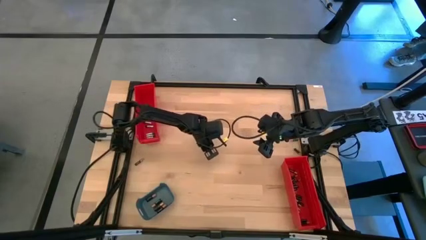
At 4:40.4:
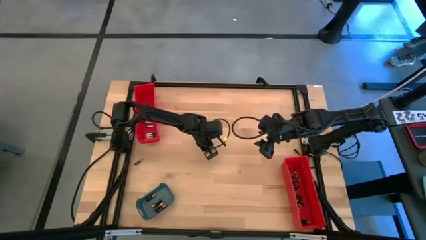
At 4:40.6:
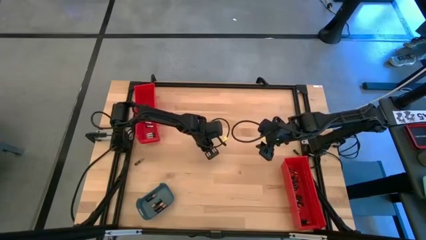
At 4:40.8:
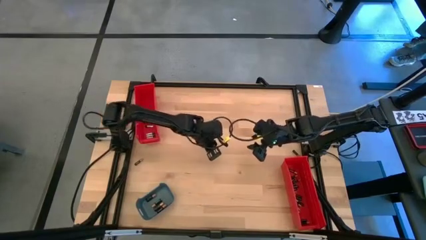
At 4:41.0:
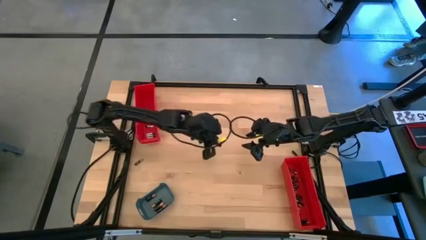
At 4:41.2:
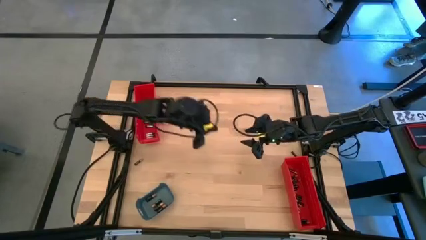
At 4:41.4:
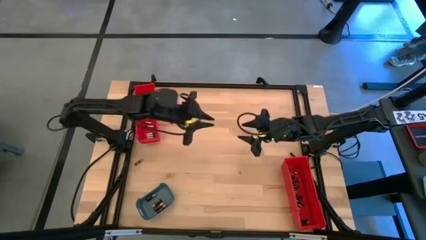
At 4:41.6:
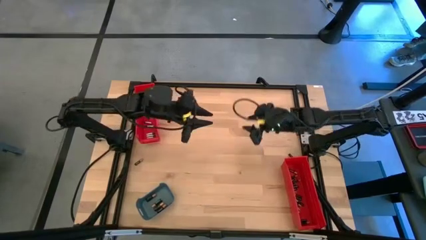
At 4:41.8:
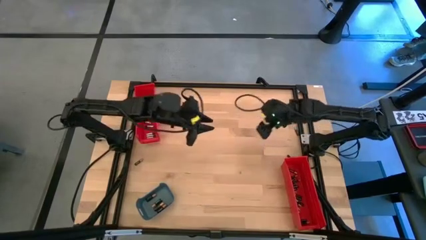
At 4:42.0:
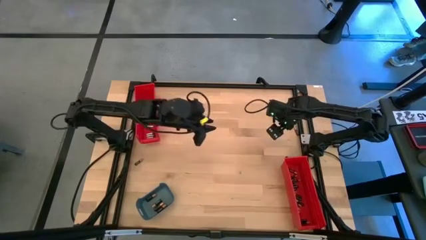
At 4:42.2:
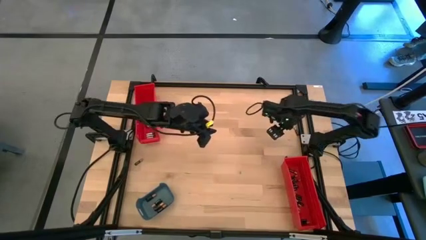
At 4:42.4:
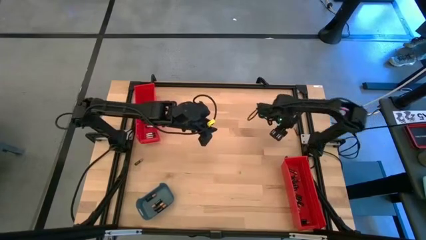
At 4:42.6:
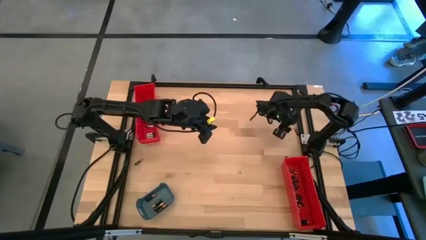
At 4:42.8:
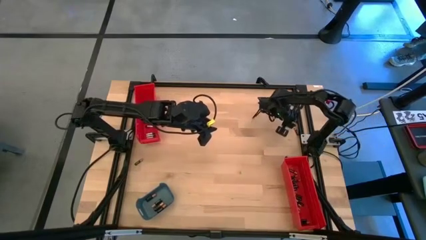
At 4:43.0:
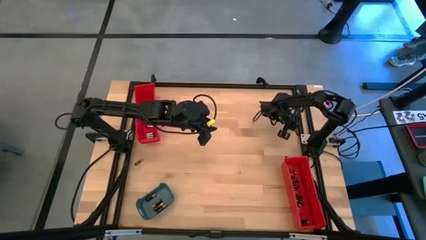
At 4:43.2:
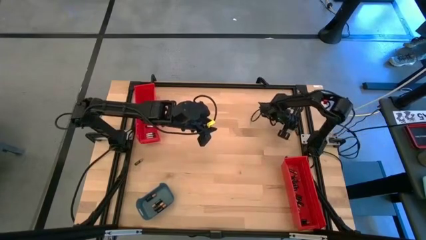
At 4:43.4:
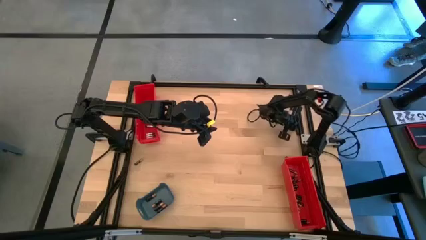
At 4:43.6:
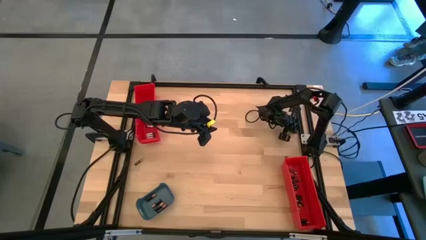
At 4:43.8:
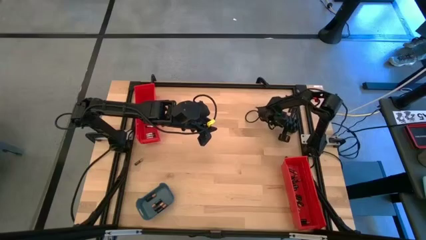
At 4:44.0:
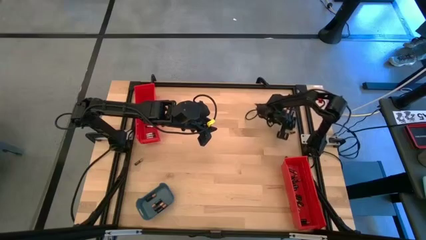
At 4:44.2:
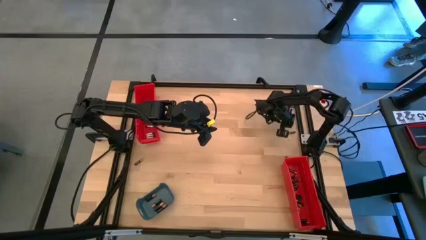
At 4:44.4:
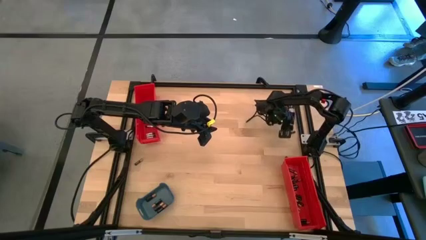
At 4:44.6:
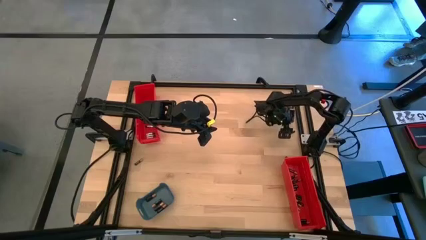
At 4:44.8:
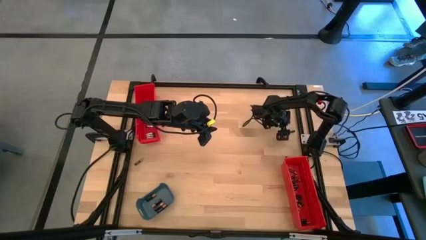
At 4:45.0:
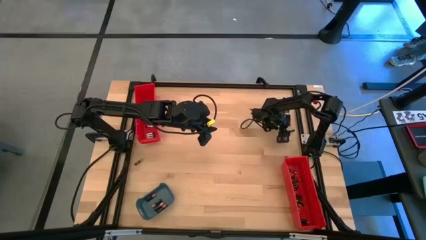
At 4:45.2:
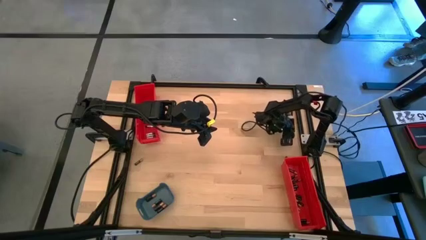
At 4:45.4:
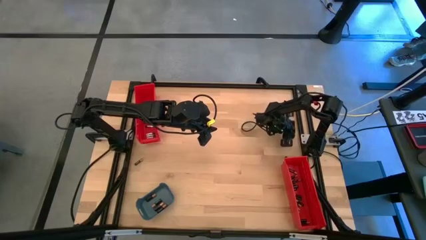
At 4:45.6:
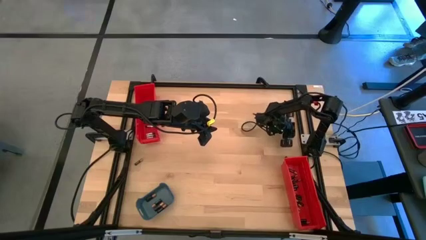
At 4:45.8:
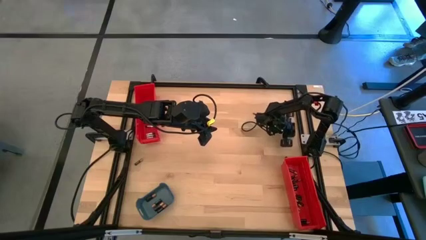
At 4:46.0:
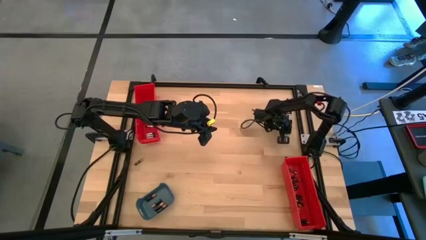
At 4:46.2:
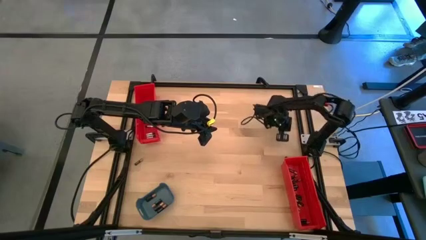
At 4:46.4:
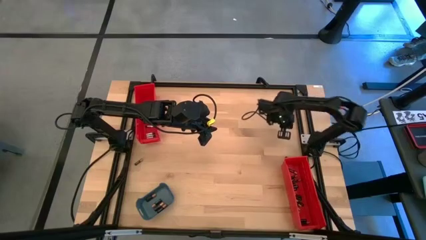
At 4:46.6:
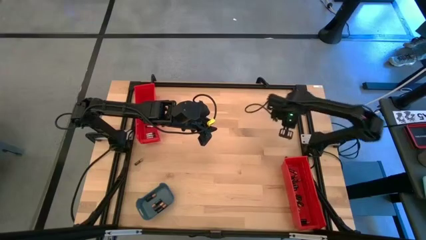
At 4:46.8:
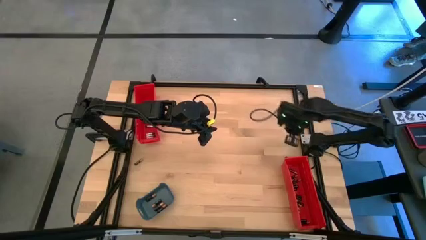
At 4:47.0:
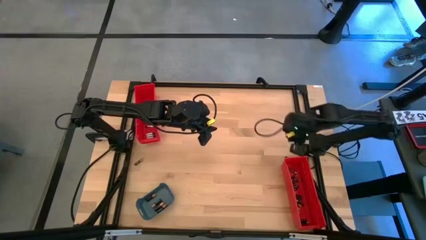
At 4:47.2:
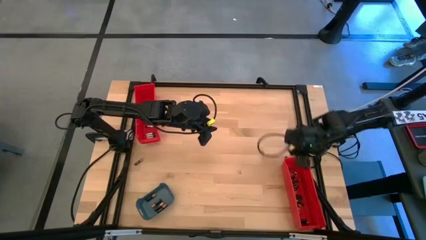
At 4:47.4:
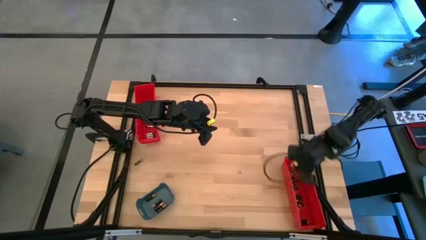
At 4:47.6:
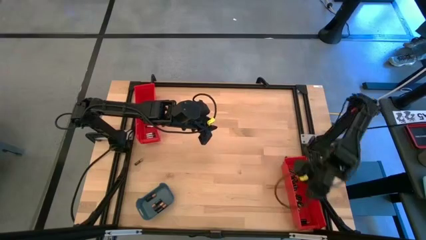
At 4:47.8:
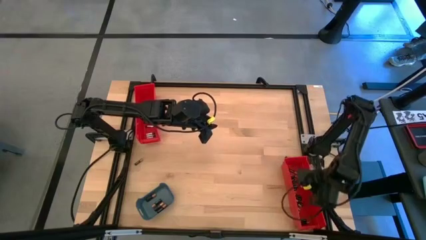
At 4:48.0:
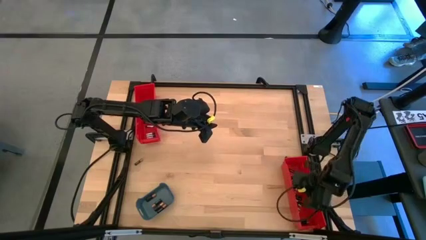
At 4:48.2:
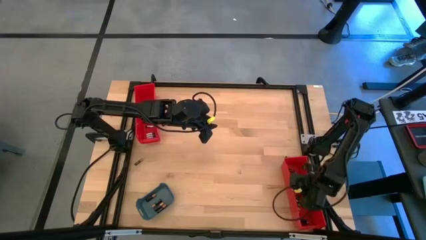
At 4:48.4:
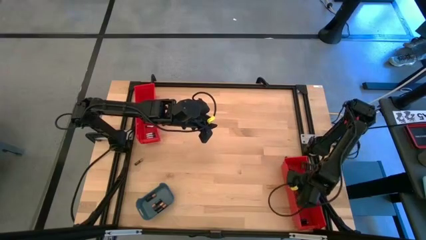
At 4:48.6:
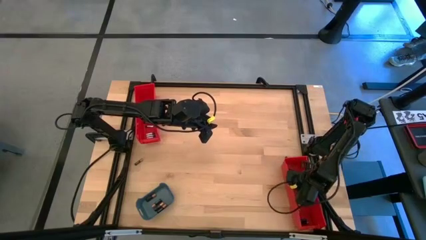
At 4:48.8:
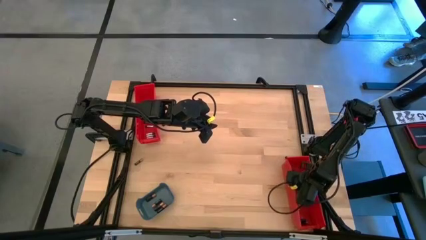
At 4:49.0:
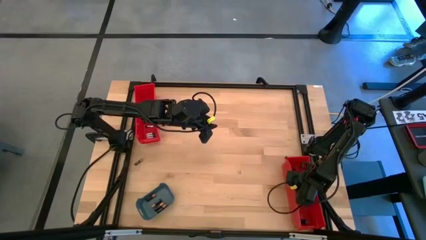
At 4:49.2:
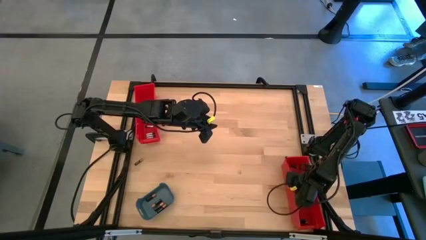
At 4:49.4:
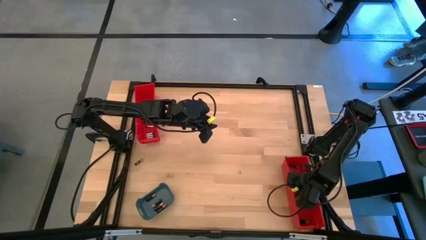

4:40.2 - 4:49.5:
Task: Sort batteries
Put the small black battery into the bottom red bin

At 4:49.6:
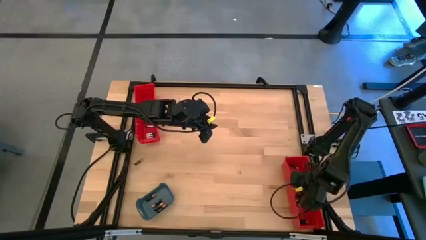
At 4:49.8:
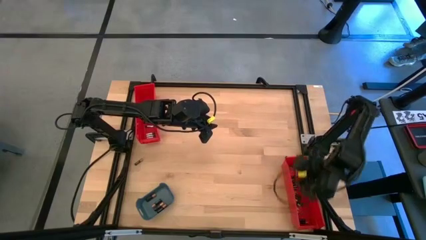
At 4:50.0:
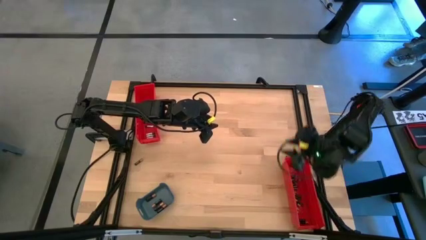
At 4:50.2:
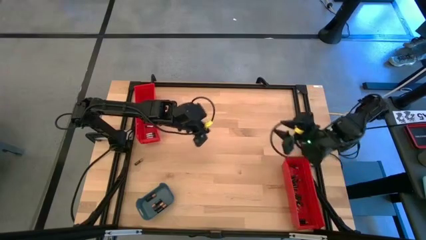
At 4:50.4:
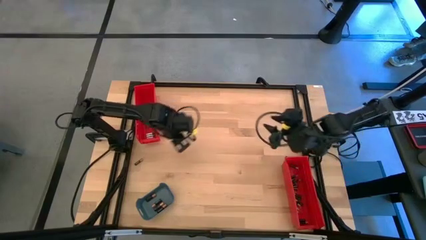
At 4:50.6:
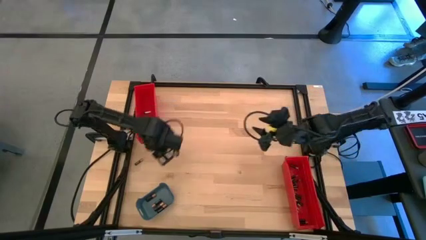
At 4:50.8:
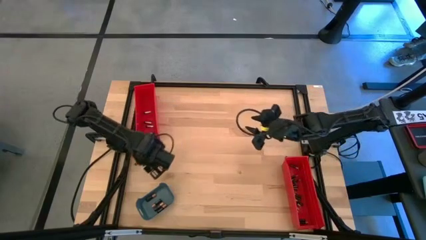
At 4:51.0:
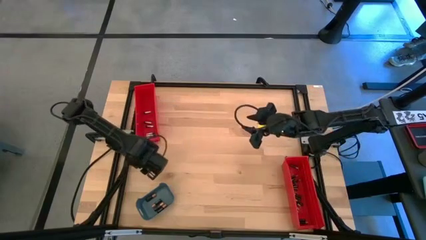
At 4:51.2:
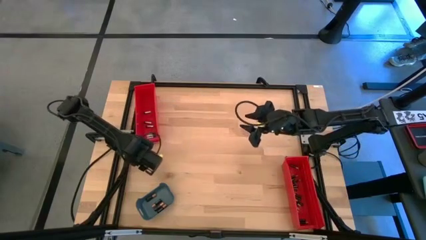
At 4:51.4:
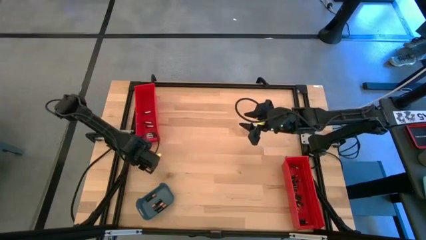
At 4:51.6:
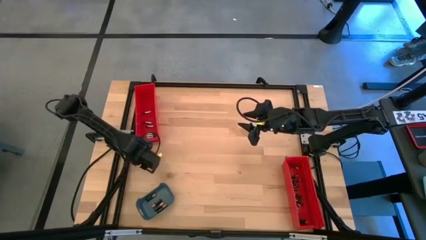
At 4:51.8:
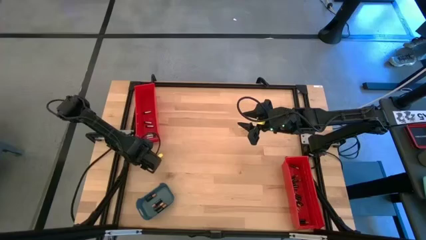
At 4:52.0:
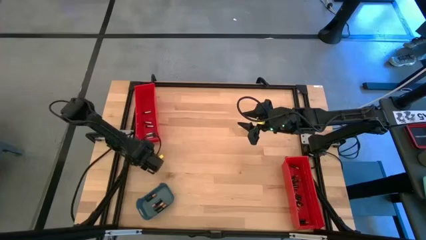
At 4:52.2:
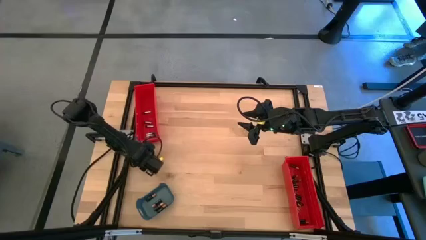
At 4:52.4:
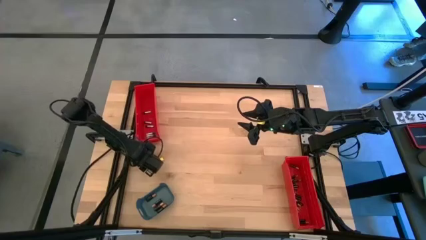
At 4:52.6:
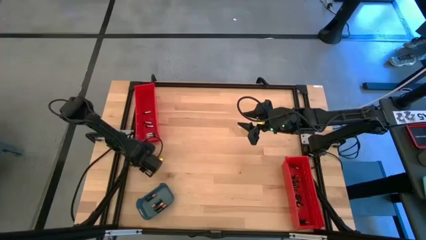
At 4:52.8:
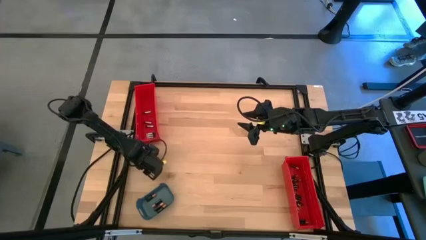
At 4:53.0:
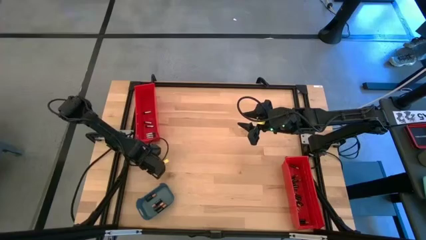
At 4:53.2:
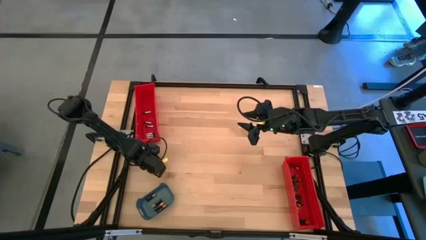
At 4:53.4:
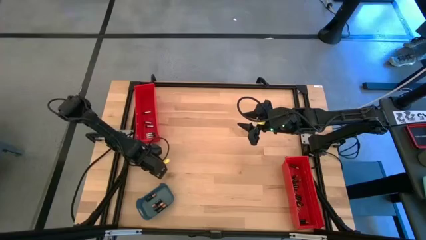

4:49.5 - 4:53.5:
Put the small black battery into the bottom red bin
